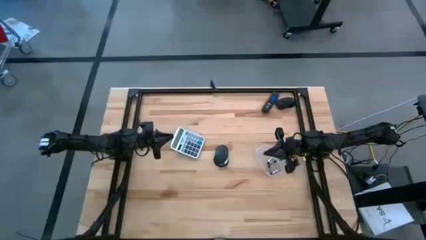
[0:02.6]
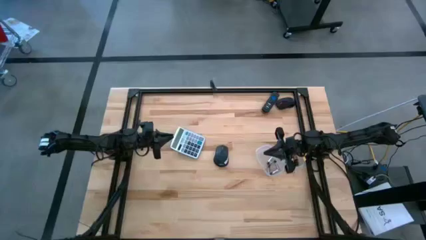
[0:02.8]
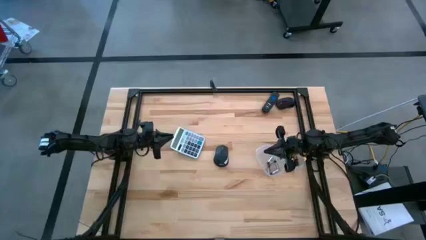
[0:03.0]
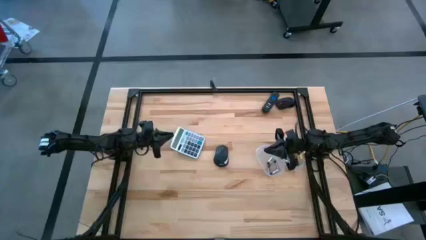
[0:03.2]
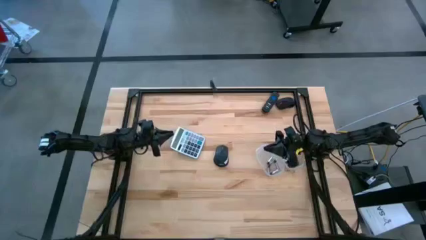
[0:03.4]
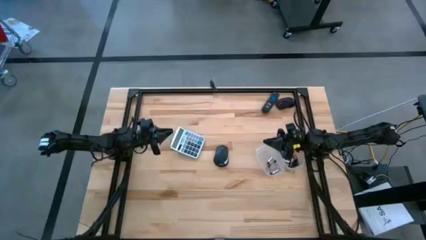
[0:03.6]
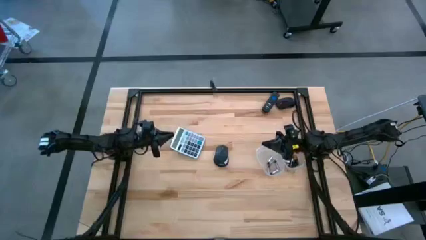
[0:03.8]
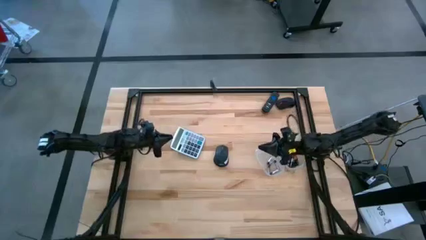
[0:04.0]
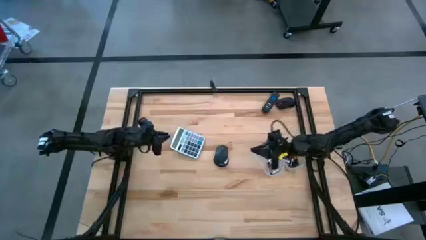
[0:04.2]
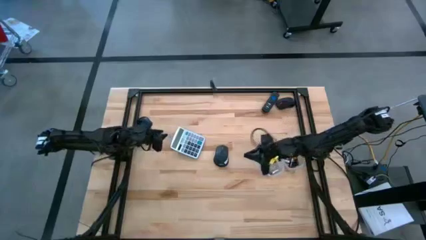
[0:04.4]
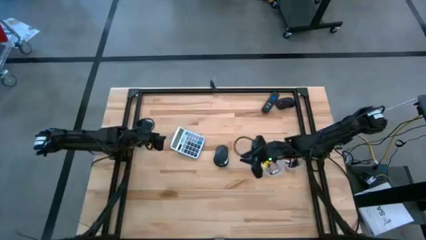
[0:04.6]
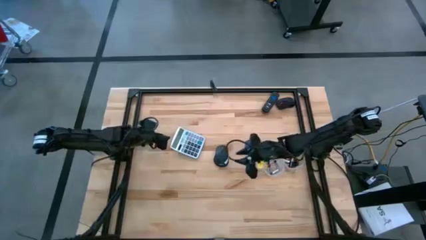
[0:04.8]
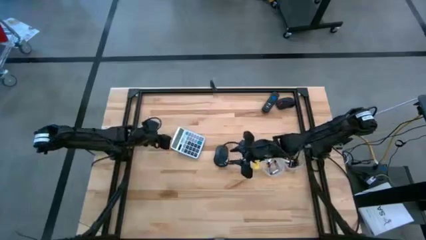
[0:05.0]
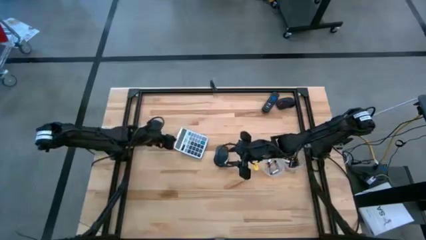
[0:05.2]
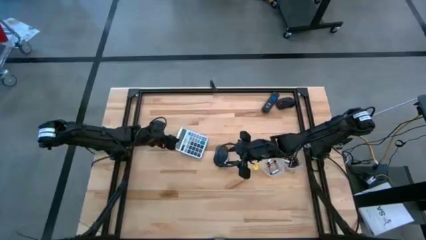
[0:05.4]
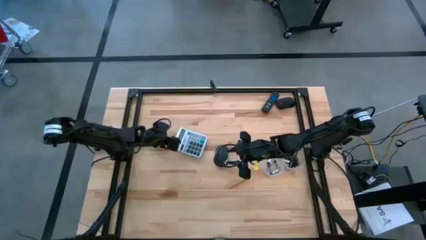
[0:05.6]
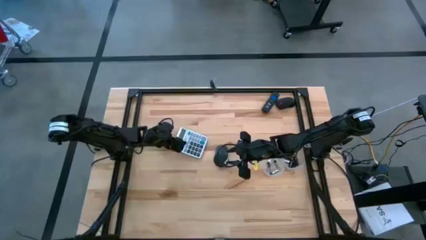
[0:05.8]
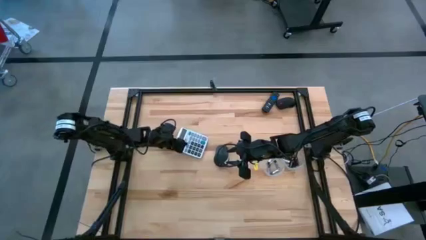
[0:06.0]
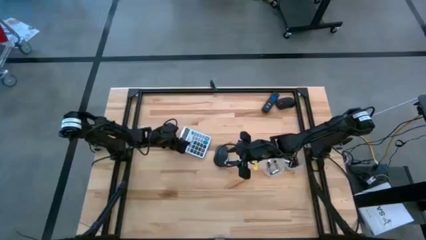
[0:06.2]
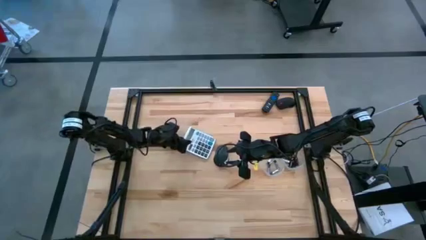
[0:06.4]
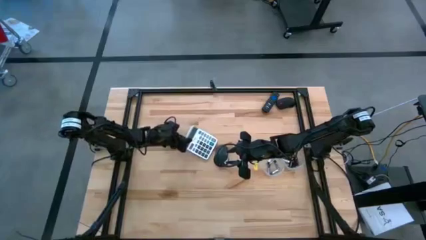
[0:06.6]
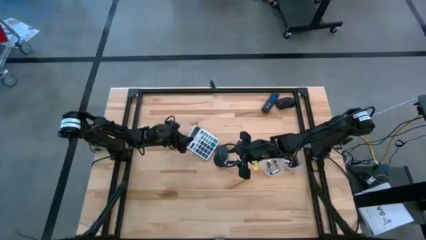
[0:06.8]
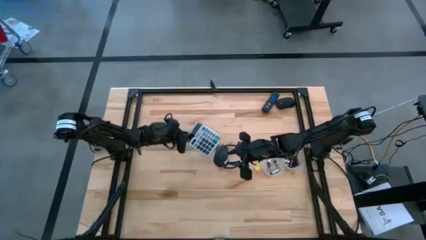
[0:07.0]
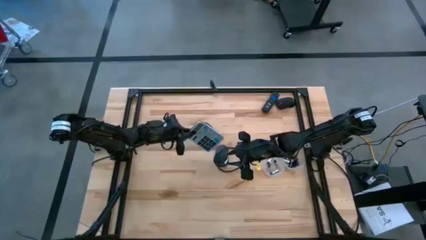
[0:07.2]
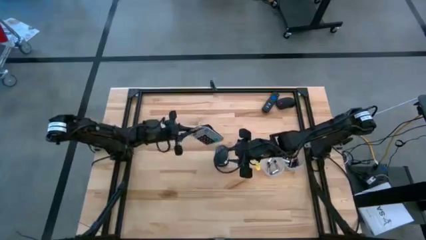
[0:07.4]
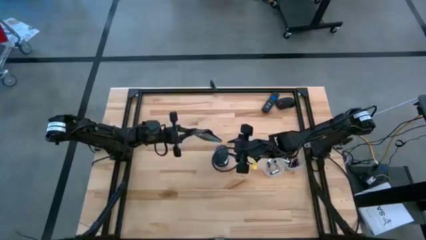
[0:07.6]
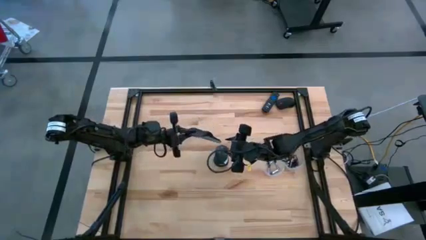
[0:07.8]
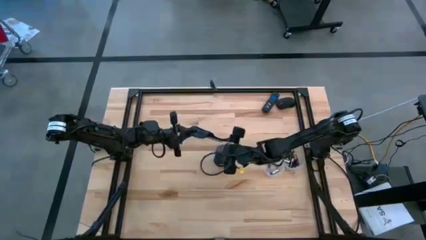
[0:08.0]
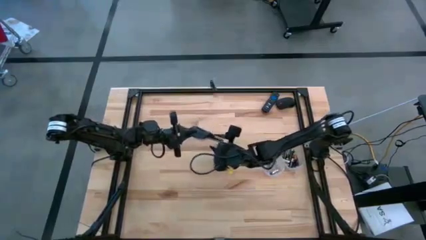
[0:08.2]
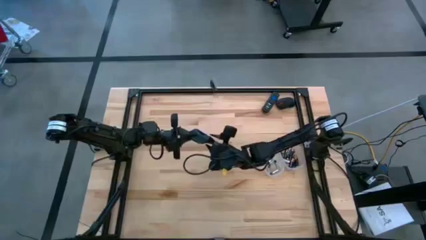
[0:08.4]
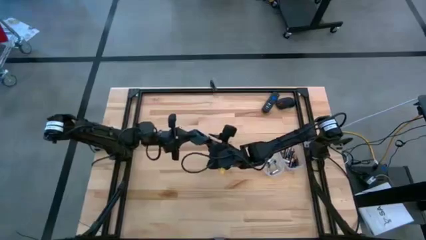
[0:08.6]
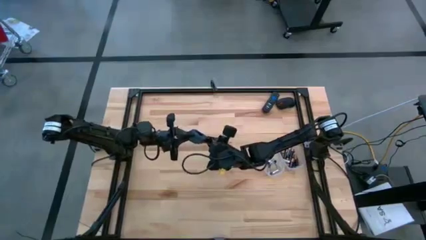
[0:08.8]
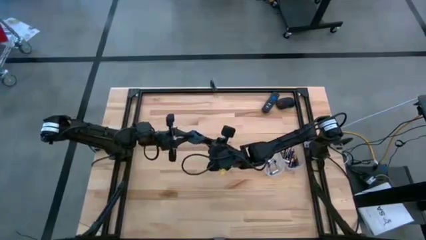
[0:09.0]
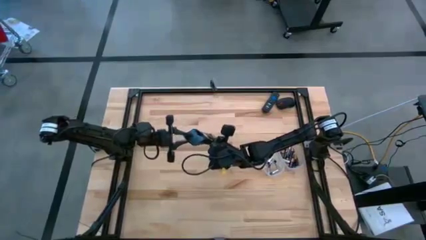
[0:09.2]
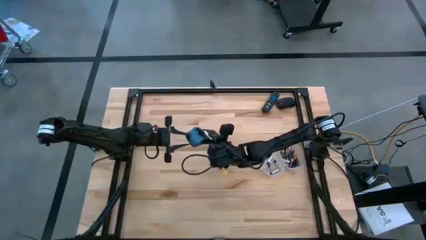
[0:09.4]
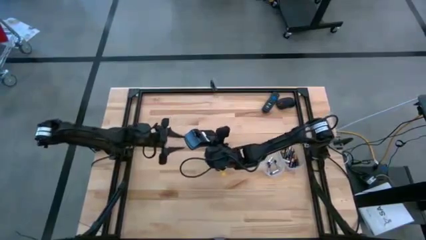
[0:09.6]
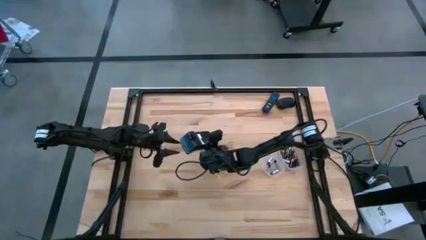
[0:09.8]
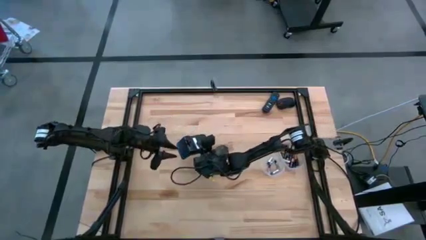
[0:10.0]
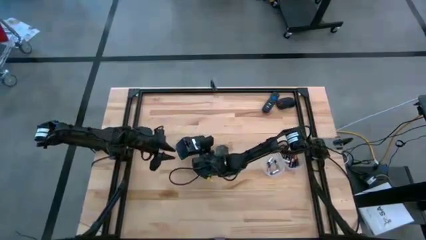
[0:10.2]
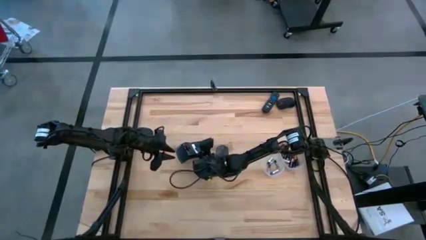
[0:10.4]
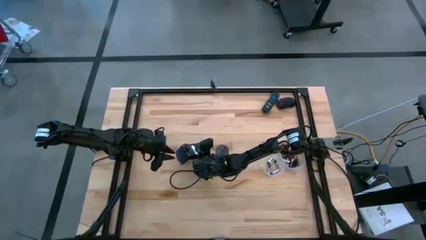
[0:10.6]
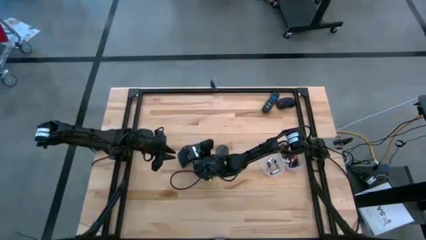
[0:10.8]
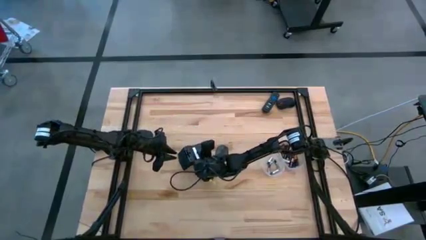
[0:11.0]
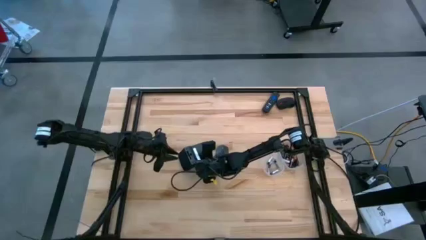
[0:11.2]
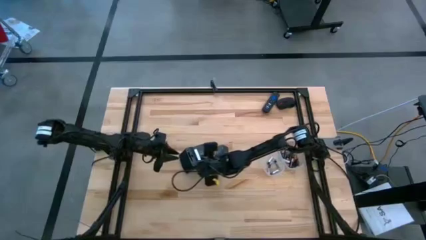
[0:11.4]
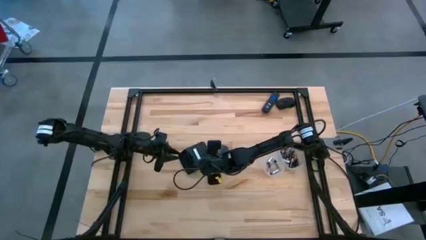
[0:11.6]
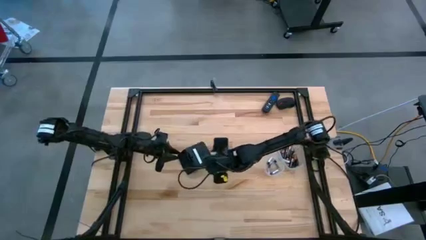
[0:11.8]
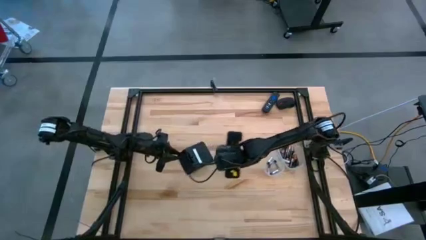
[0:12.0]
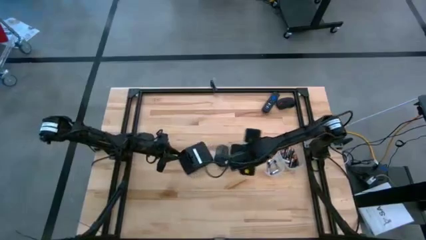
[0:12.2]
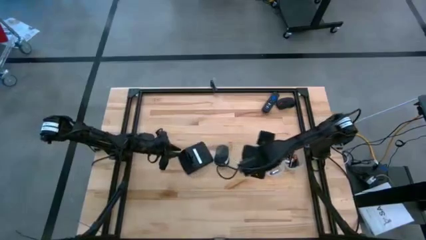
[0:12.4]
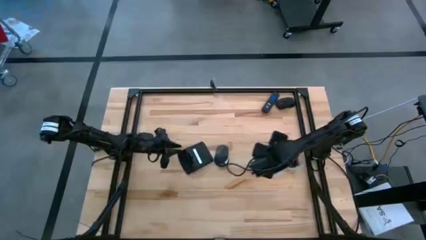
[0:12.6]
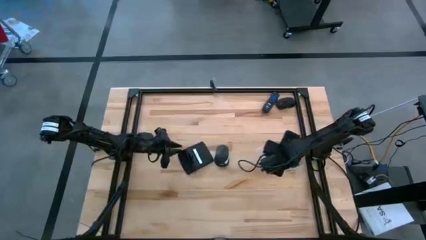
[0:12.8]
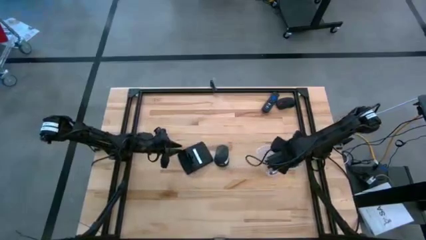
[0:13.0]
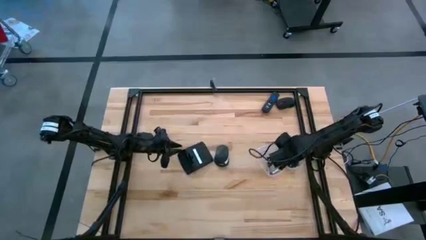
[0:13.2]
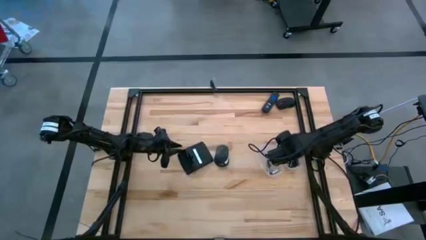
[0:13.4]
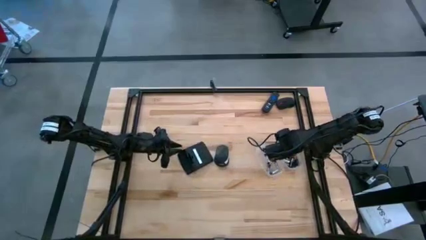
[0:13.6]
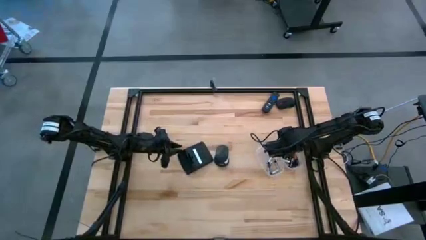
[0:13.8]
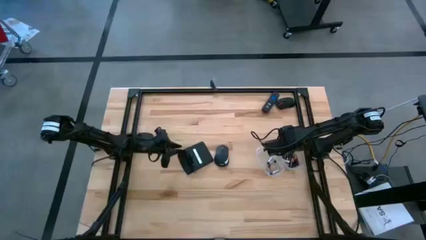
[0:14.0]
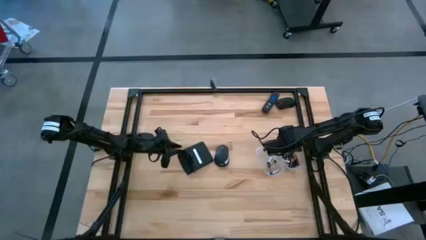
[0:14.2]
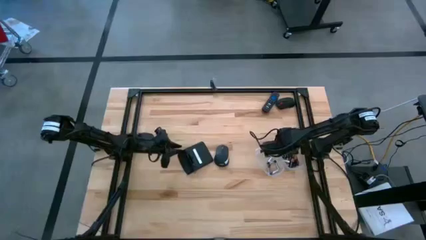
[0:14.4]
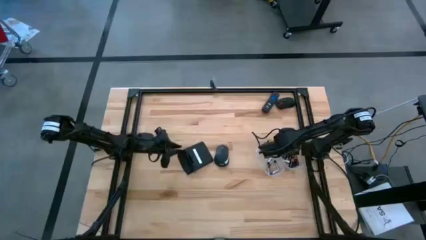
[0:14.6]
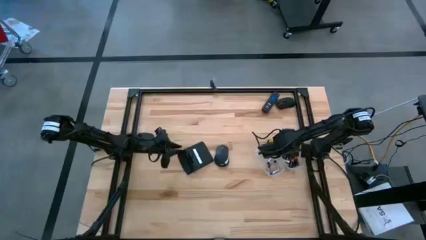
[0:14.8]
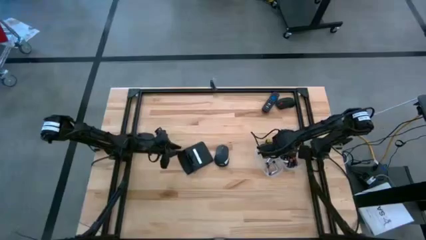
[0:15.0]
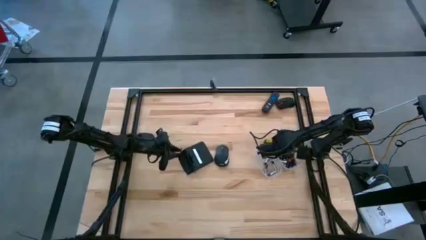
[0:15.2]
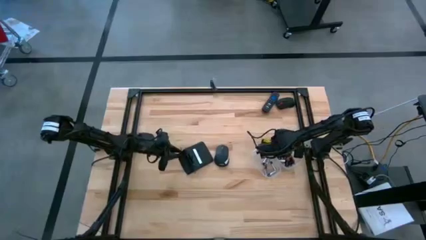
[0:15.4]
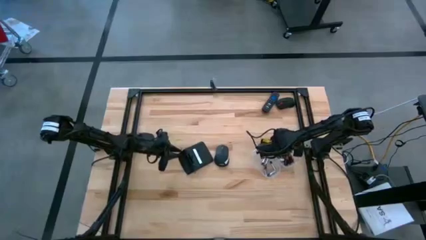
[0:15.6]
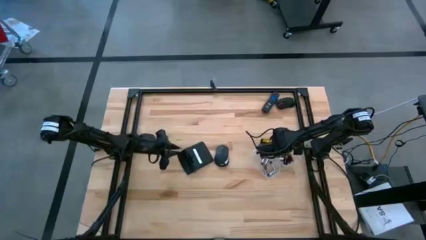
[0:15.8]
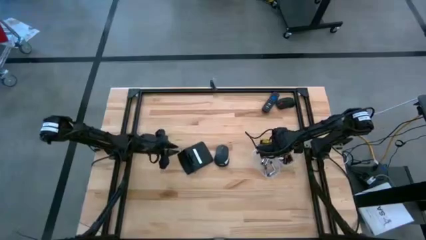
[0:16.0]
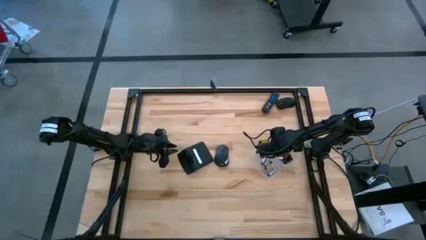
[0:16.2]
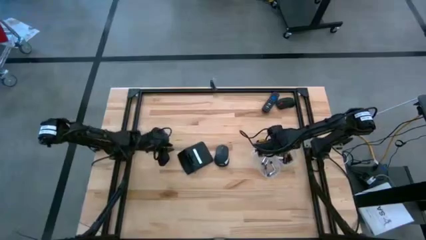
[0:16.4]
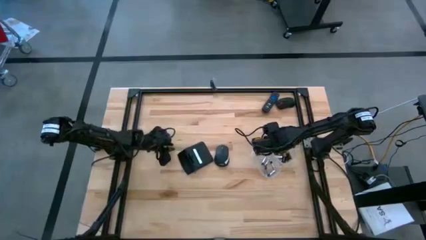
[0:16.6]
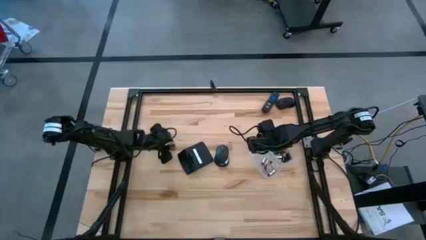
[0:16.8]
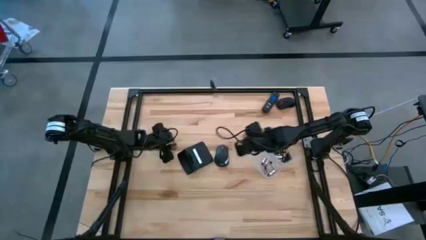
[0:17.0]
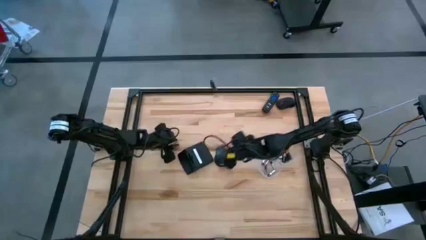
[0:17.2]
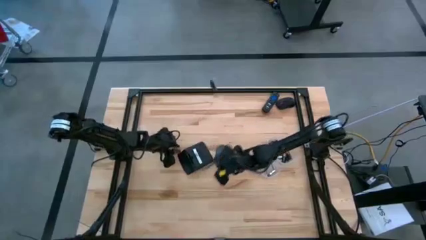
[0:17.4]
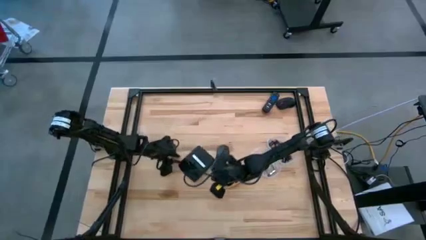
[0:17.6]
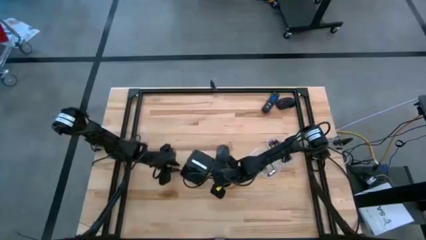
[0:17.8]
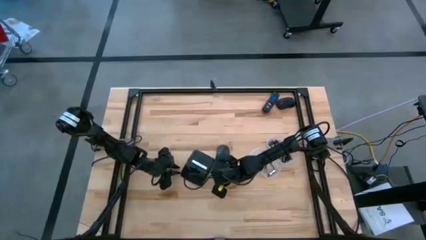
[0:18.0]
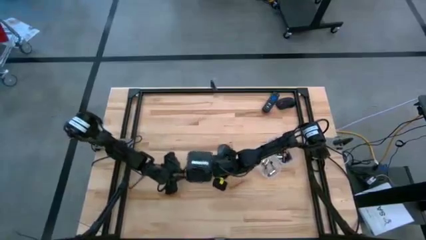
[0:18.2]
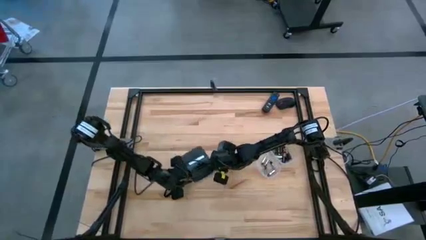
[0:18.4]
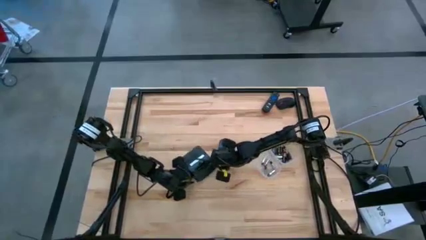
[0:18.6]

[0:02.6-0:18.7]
Task: Insert battery
Insert the brown battery into the calculator battery compartment
